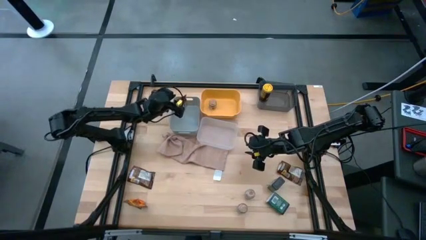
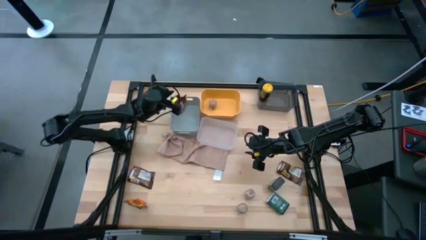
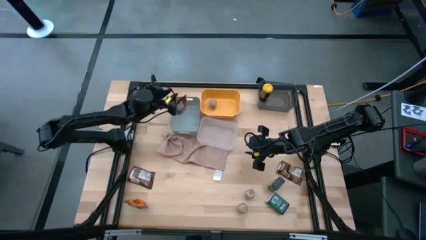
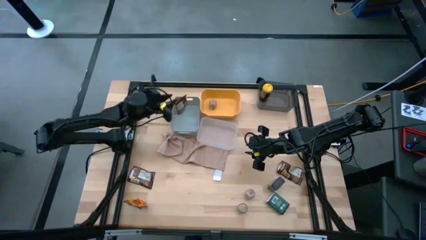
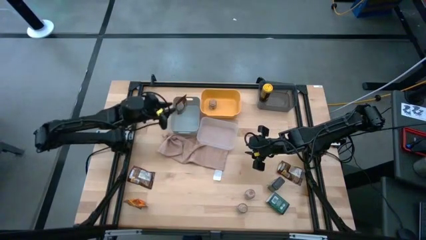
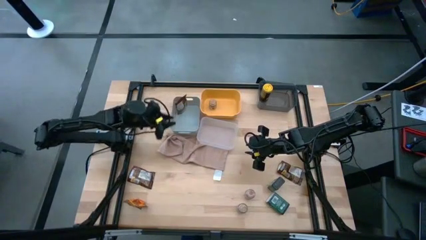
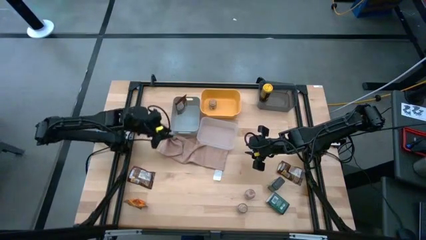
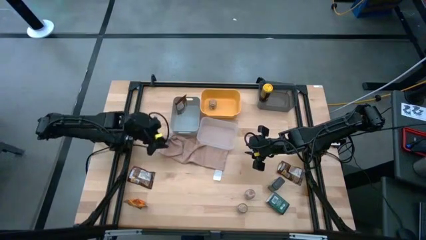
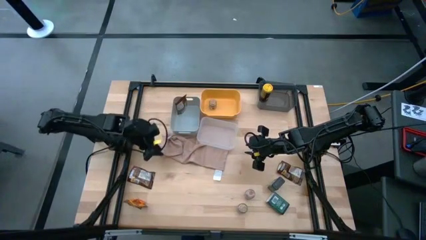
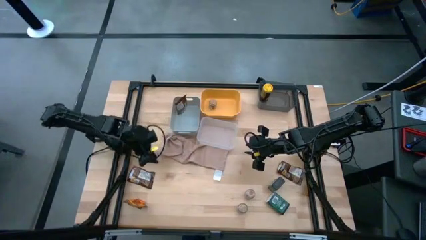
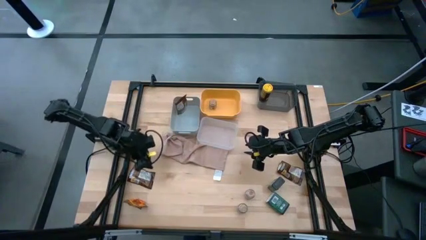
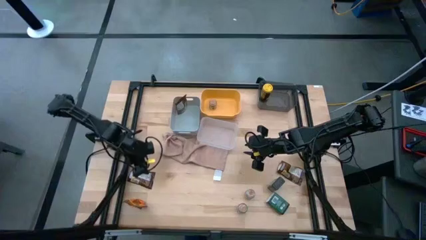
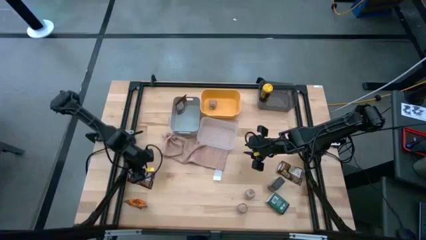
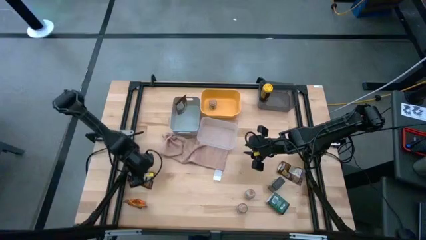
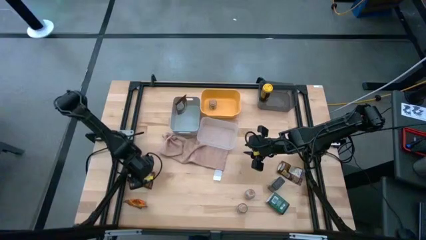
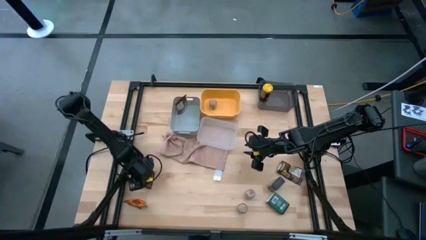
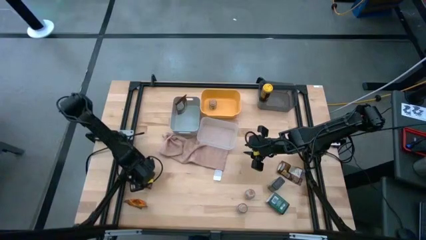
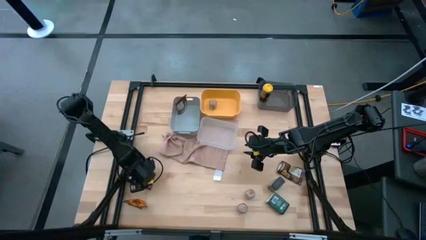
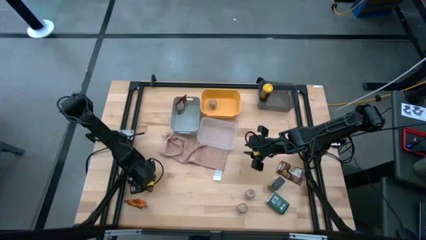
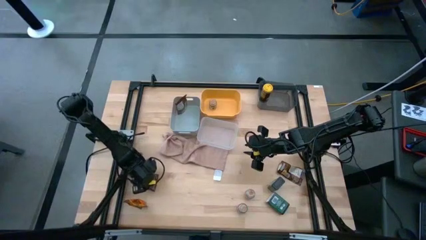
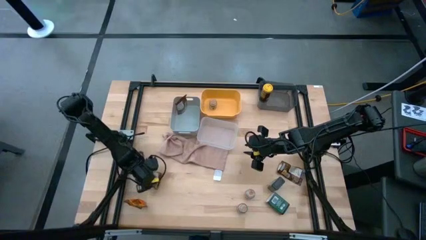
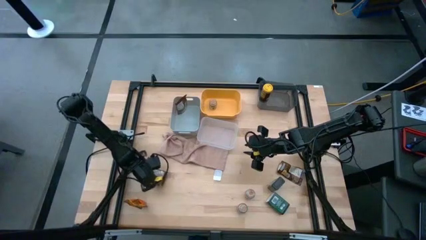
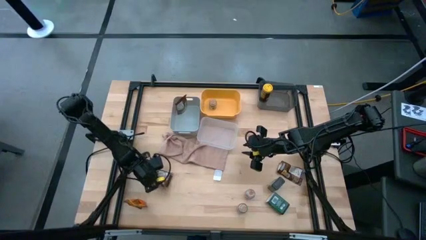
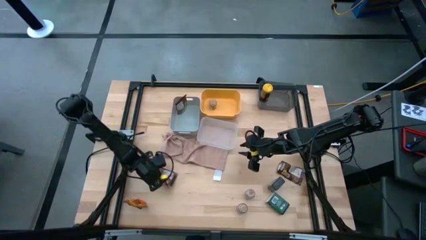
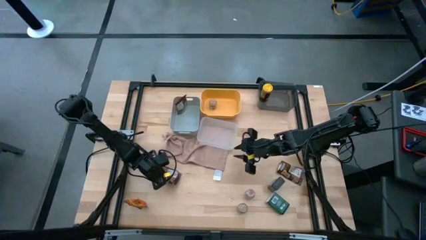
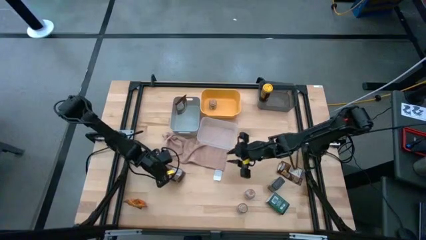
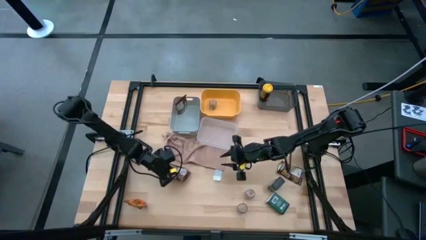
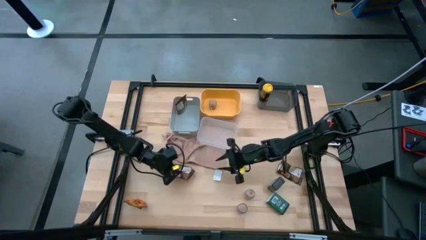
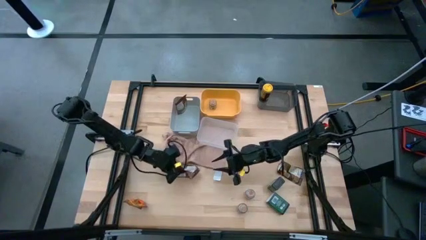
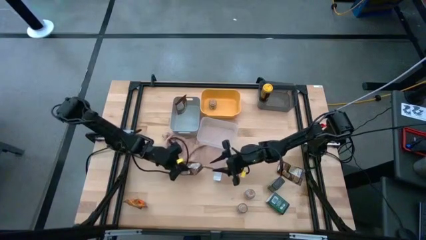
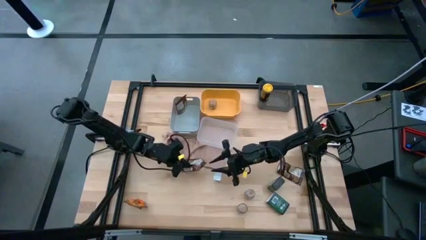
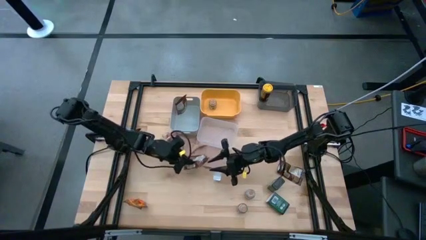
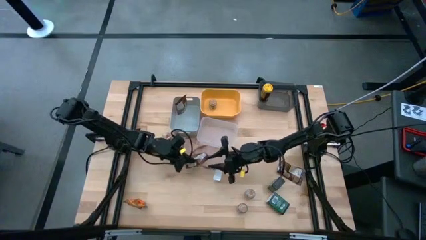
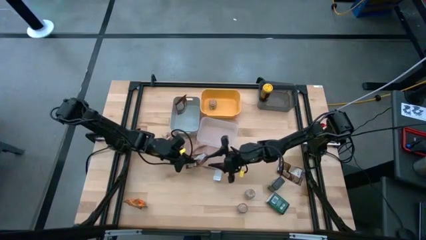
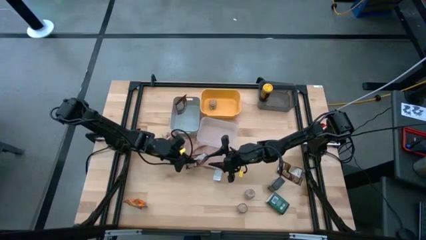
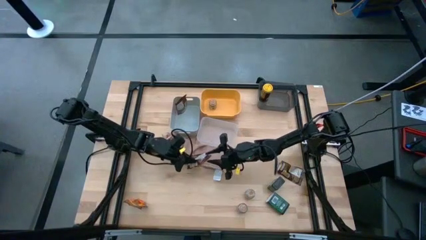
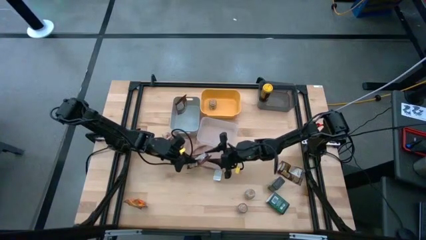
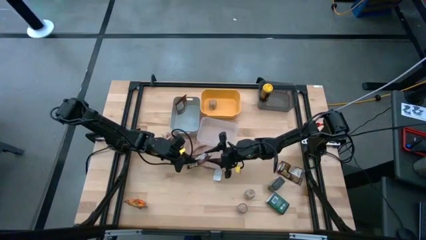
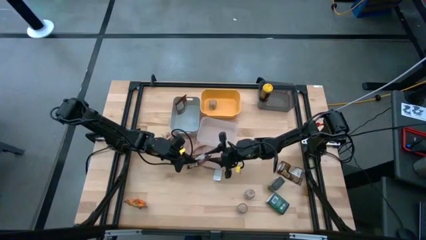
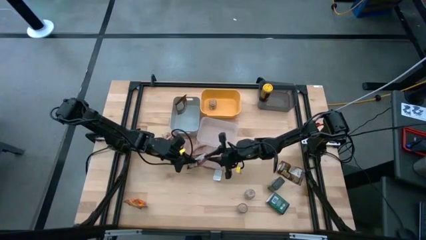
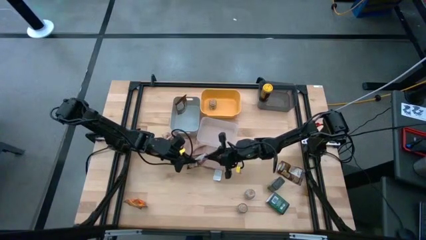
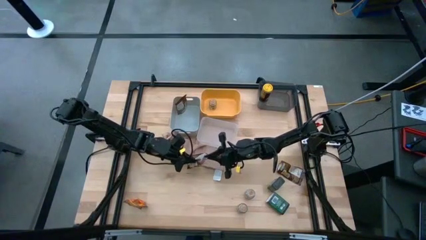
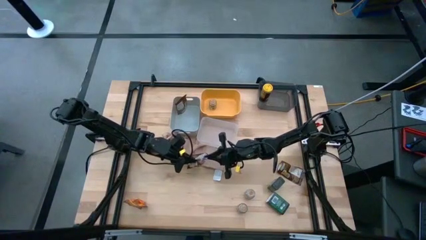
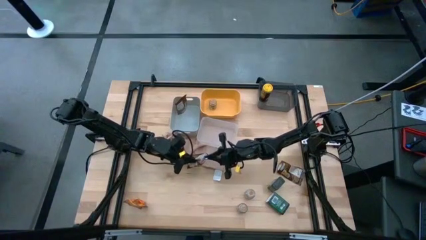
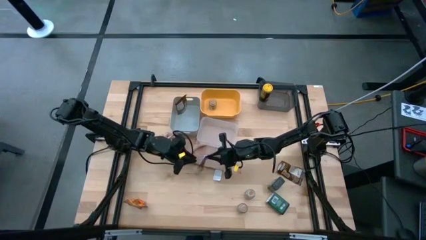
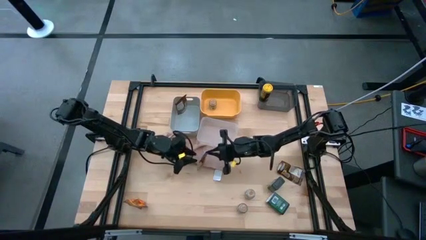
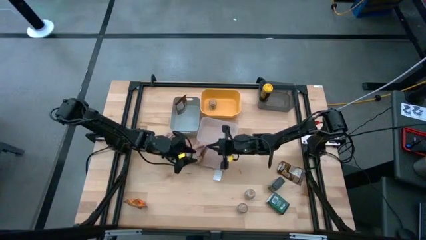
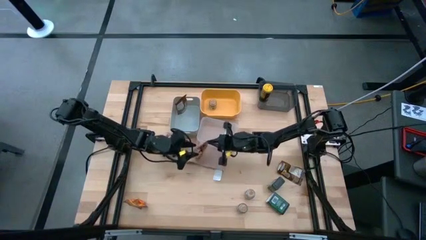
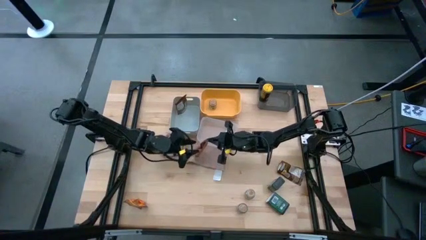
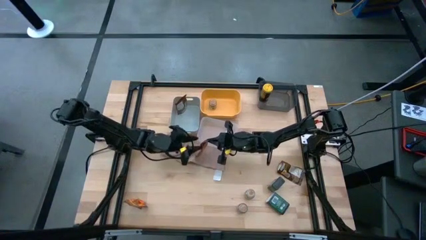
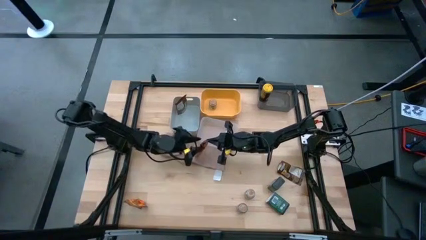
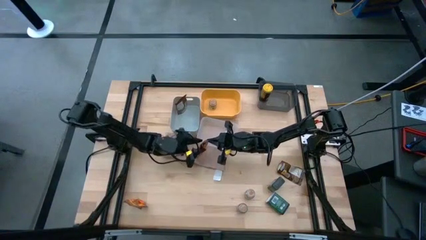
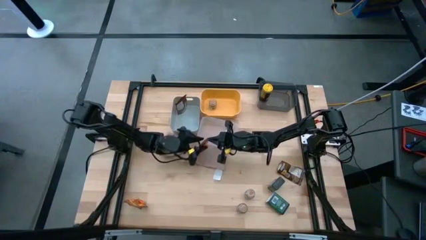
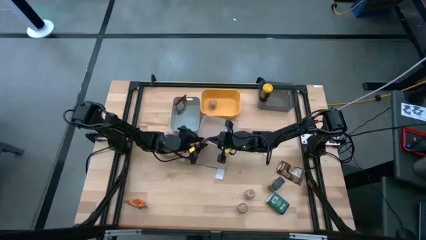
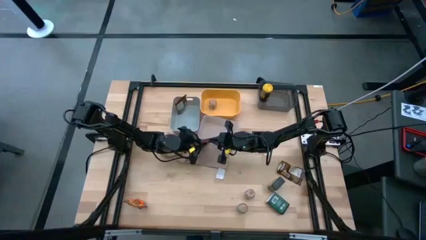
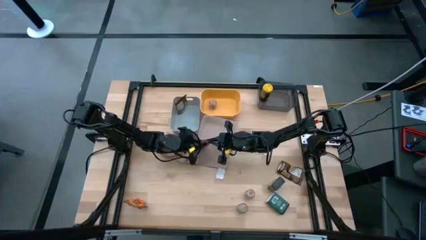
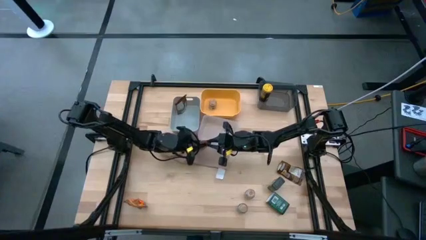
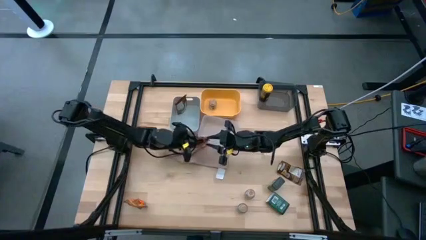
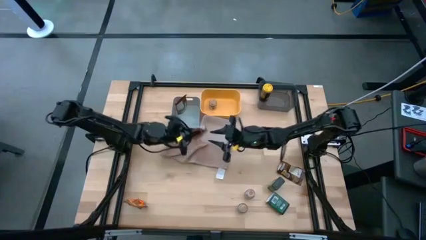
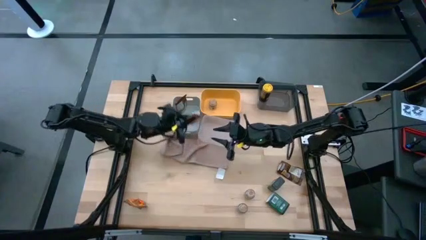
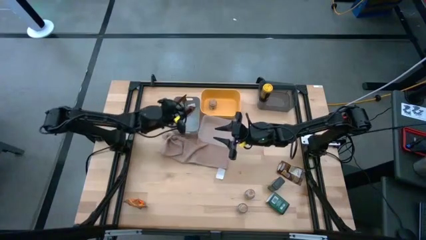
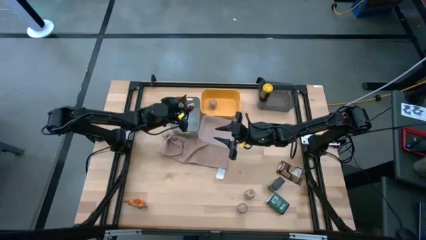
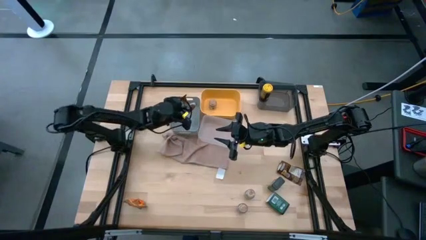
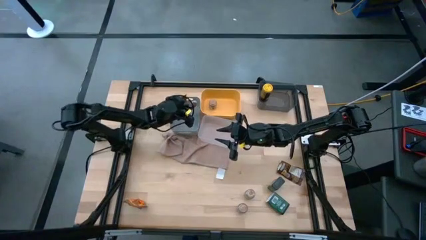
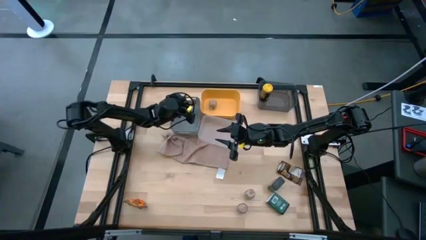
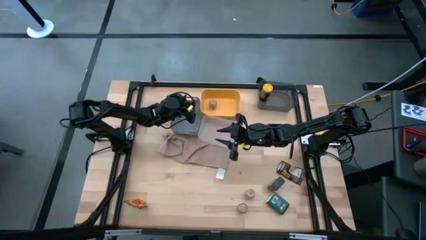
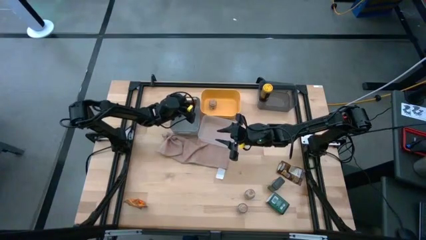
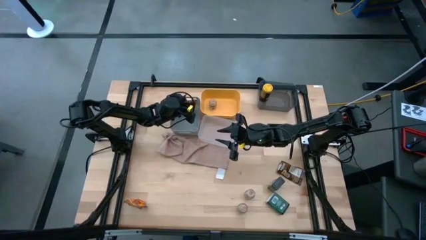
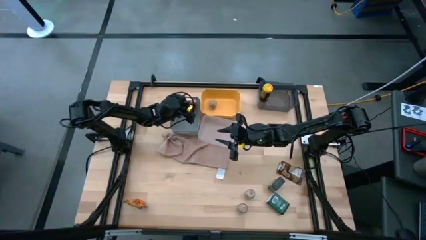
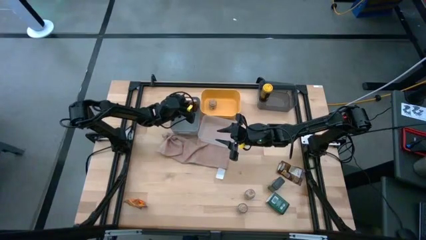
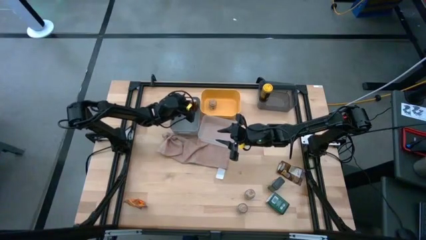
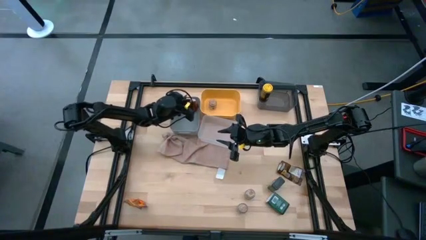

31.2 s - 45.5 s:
Task: Sort spices by type
Put the top left orange seasoning pack into the gray bin
